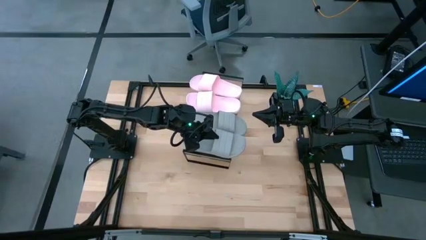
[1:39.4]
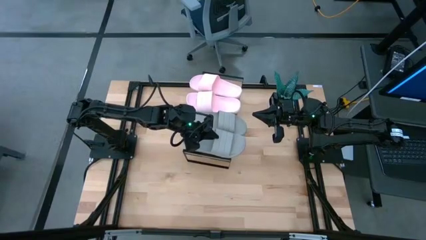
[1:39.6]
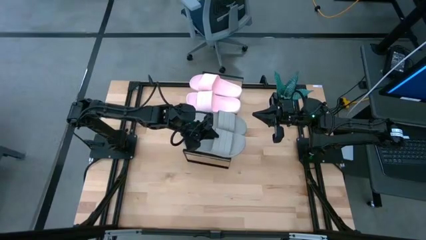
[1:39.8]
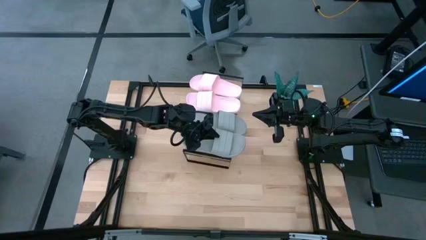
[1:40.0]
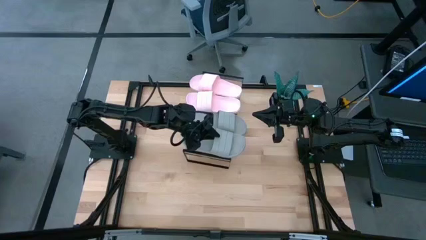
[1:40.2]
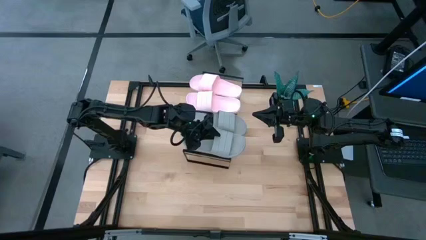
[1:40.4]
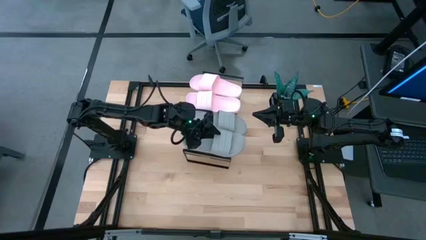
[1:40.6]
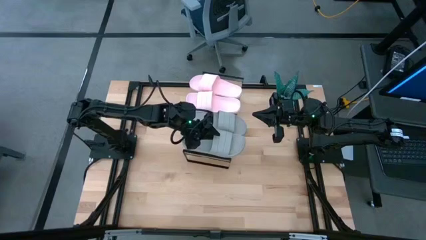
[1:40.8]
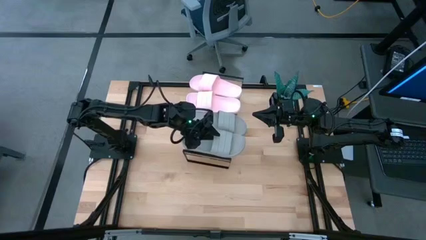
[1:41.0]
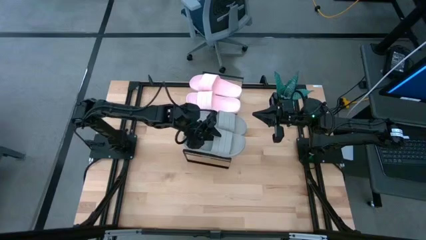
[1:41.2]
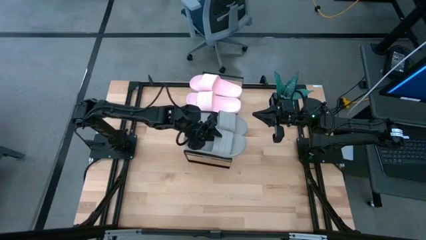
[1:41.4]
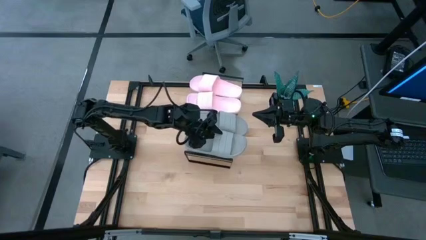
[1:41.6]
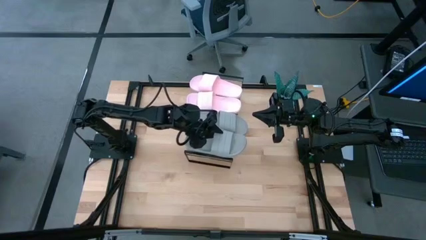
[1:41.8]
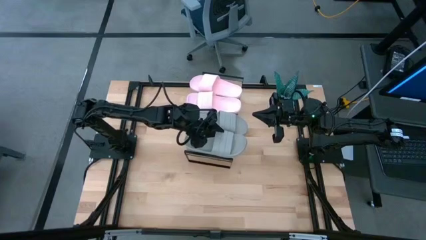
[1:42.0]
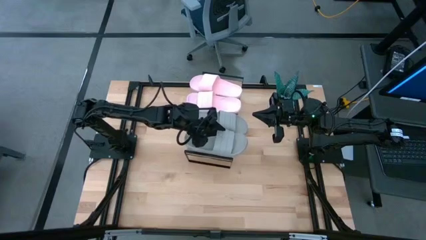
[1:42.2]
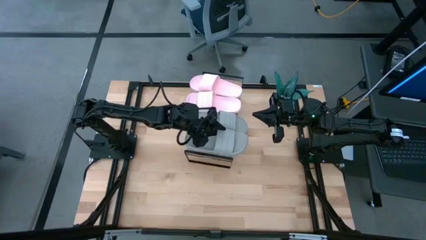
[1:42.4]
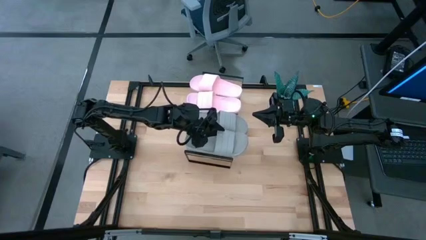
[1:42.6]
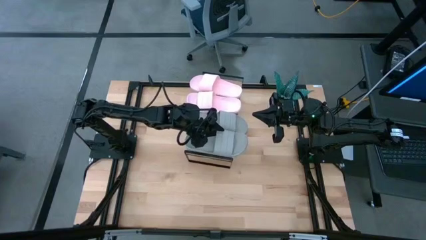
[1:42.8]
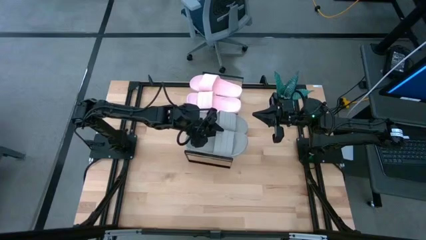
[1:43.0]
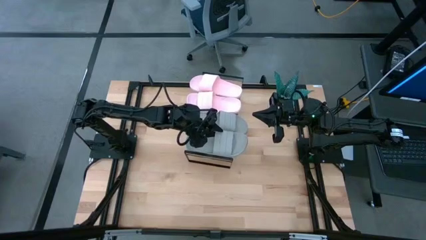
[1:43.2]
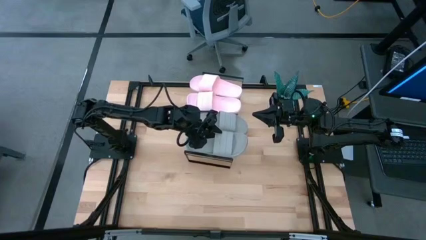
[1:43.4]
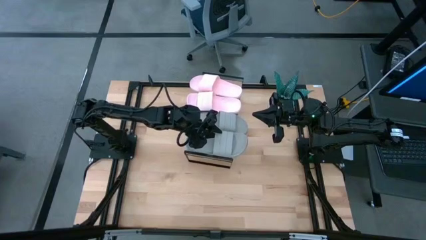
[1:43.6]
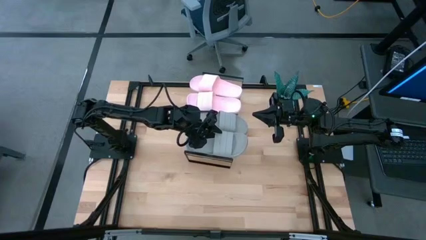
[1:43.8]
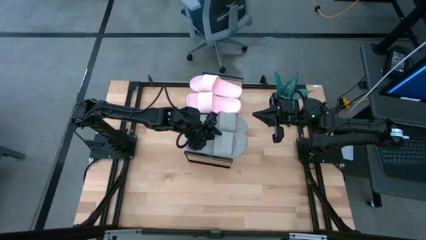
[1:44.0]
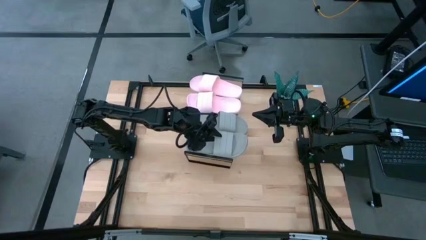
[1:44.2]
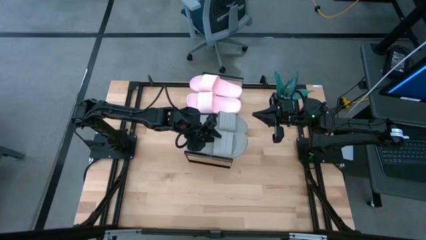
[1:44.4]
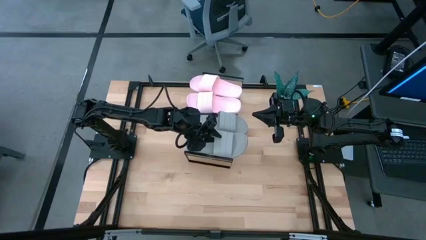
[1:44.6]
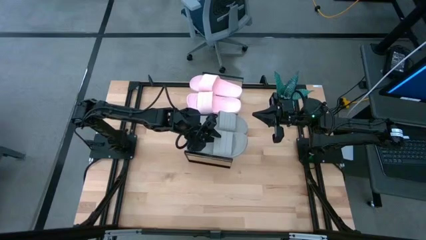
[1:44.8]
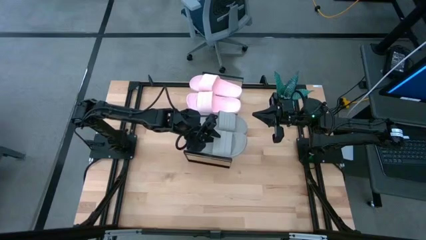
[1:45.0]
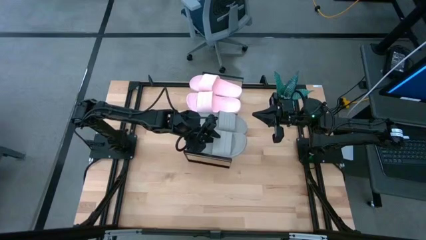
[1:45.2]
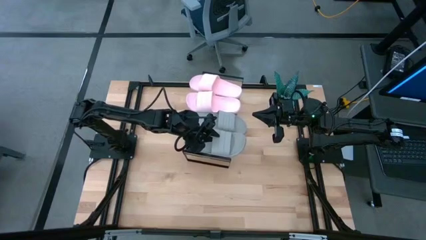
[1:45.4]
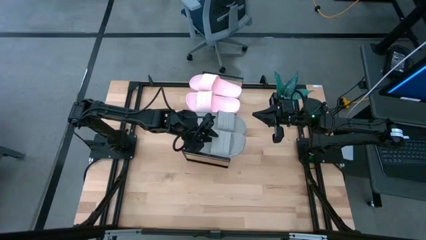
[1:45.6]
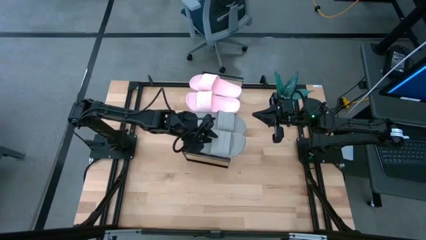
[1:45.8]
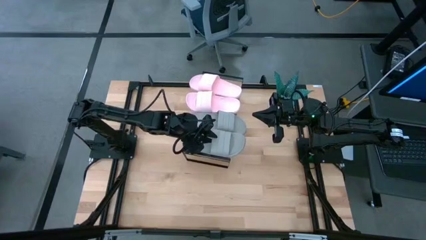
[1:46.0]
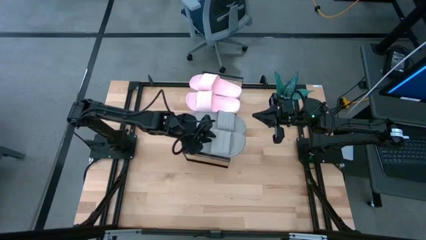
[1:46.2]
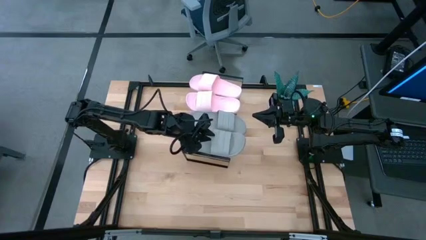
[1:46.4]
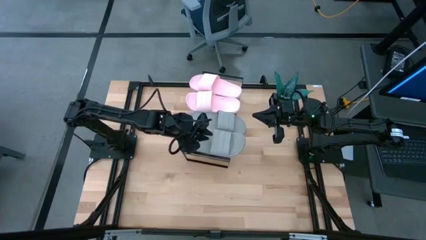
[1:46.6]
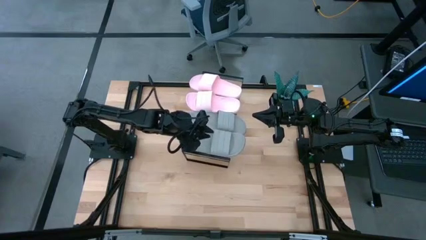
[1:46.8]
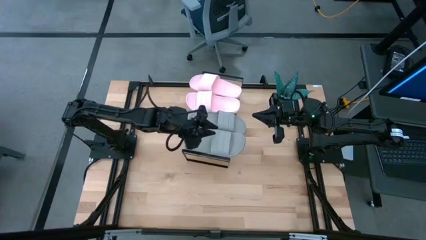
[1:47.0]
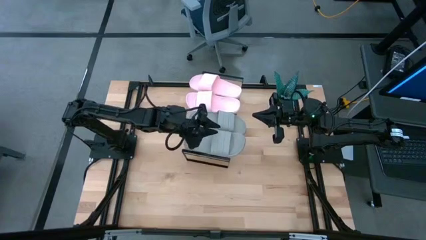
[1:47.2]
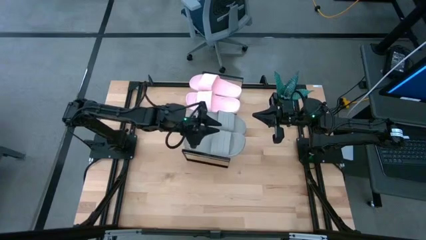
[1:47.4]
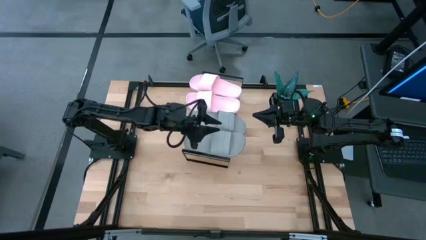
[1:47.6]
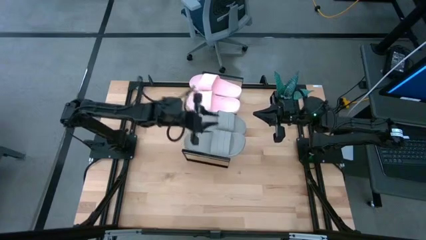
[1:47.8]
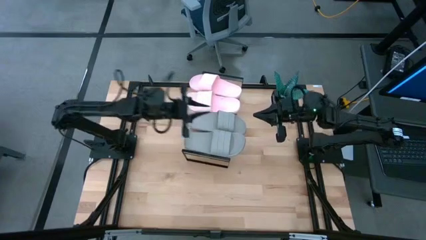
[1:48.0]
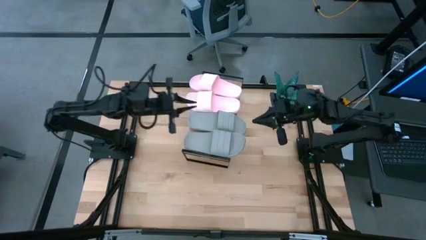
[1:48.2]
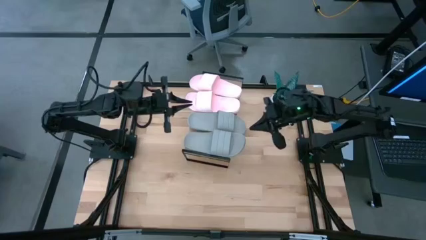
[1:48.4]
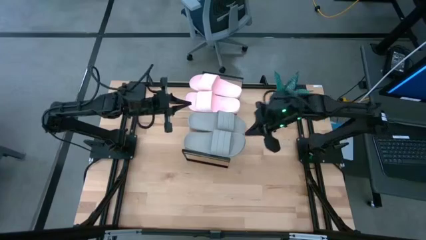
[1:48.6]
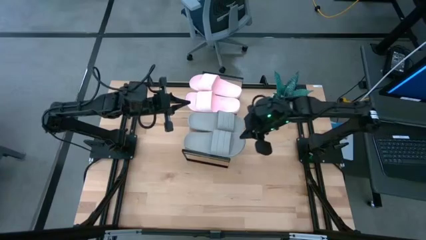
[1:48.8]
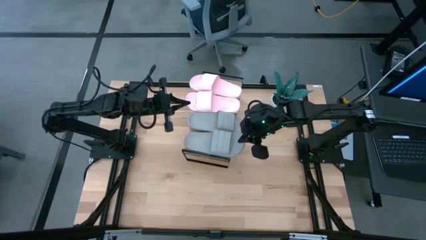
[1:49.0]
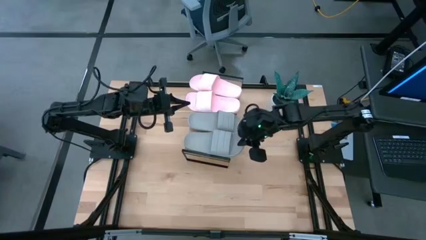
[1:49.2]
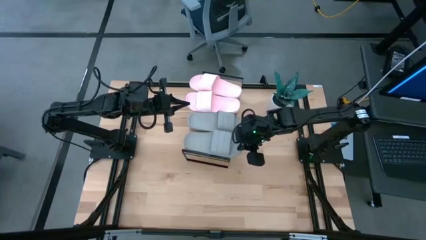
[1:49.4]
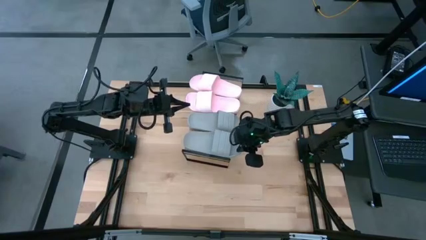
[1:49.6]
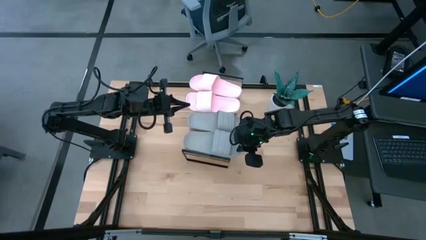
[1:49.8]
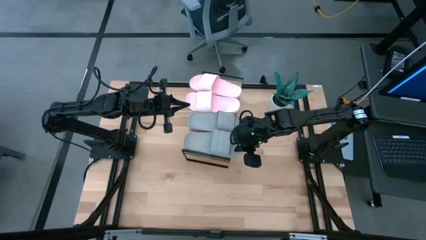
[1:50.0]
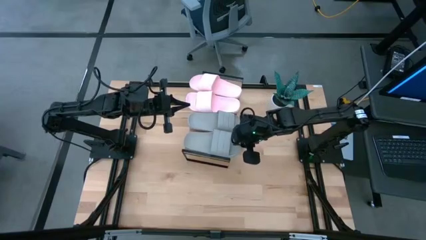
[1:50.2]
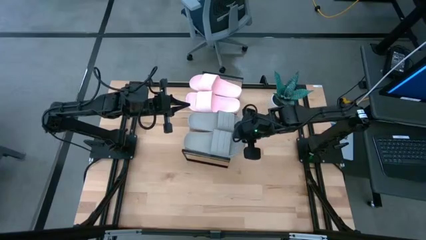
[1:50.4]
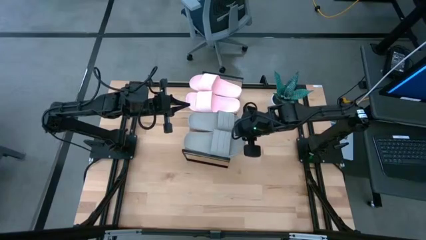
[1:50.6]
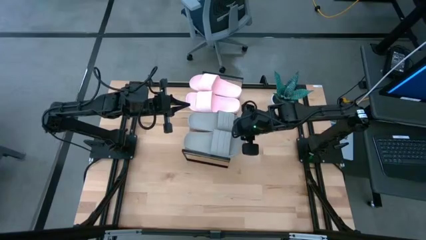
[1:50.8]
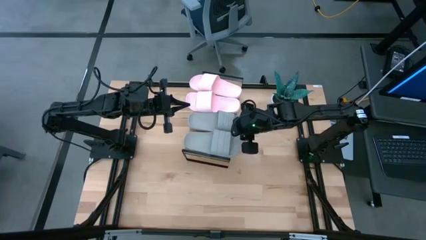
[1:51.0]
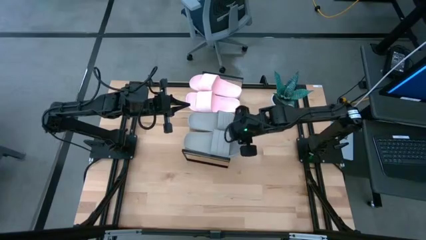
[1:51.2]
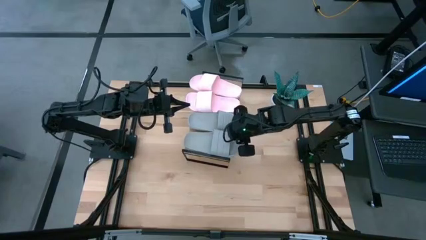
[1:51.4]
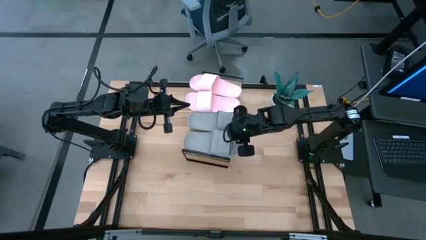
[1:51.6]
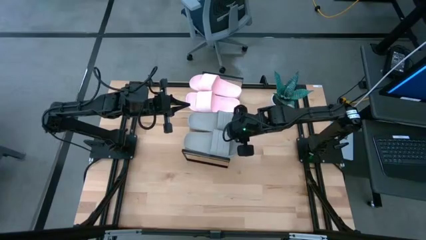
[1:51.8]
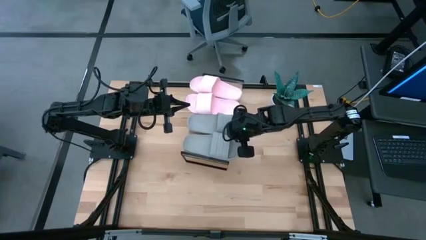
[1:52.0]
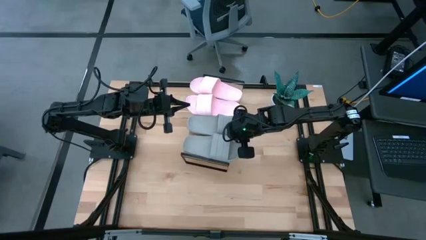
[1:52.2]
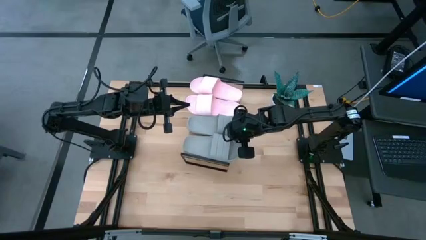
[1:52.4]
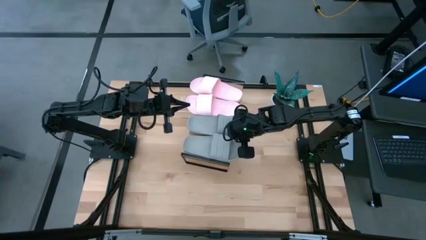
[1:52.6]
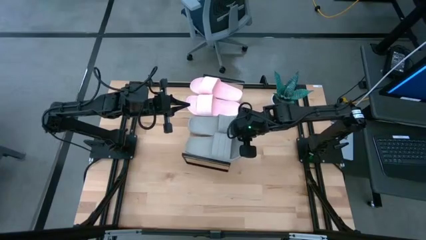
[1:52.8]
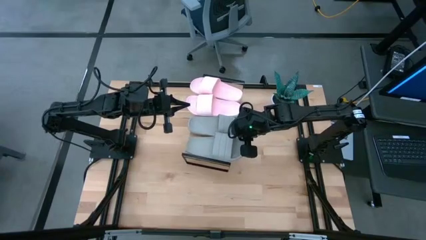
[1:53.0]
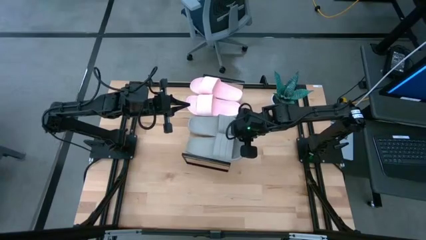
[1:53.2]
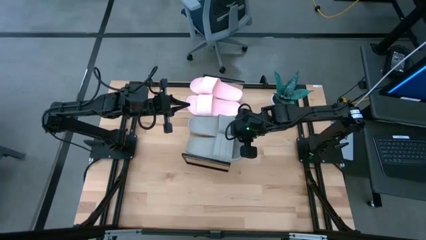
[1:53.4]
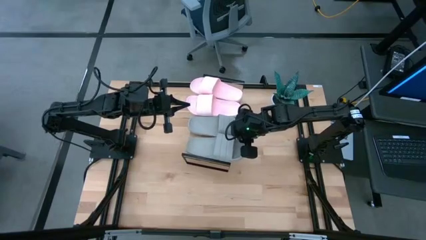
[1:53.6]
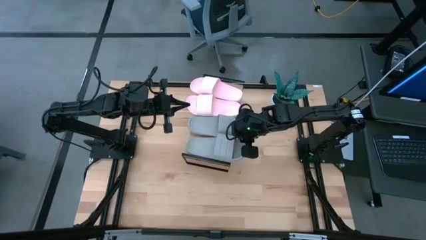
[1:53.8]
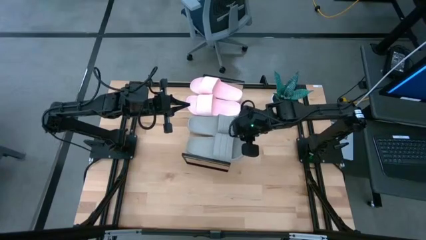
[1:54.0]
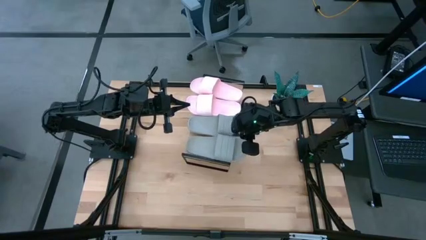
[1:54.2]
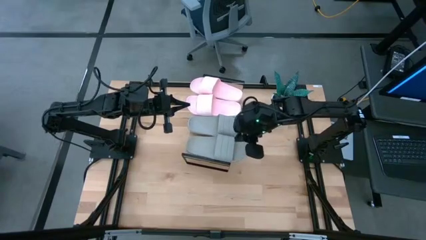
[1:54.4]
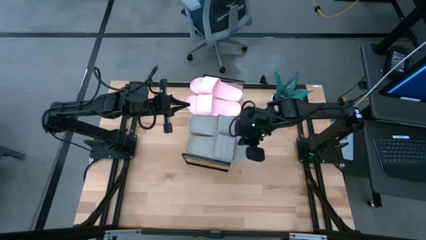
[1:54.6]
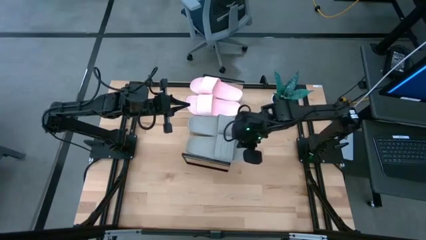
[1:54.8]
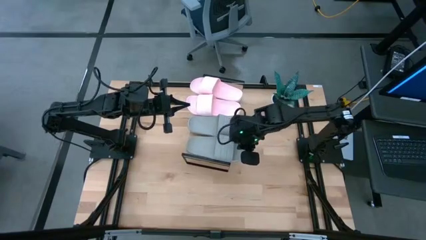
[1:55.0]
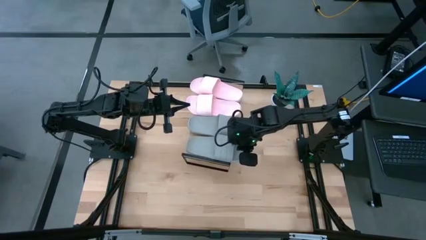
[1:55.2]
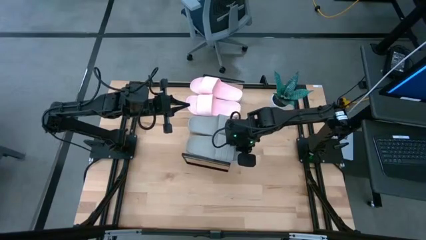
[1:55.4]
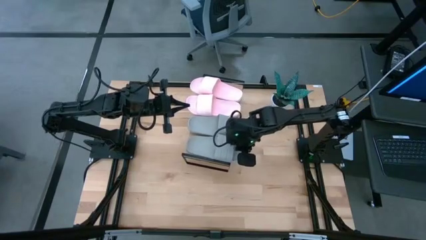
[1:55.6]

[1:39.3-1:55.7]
Task: Pick and place slides into the shelf
Put the gray slipper on the shelf
